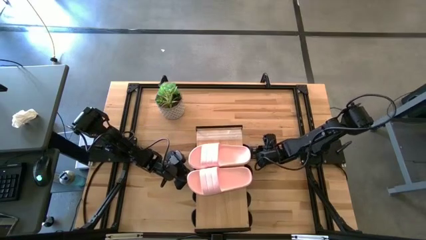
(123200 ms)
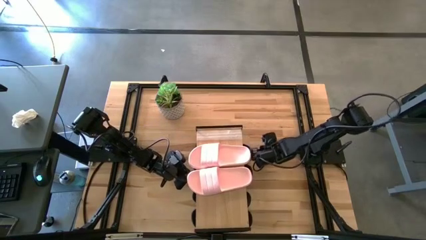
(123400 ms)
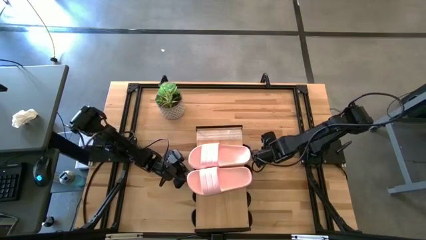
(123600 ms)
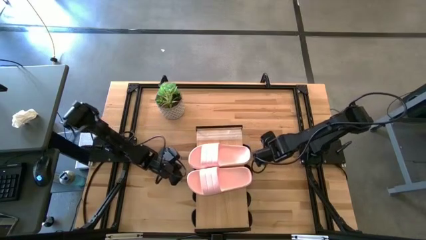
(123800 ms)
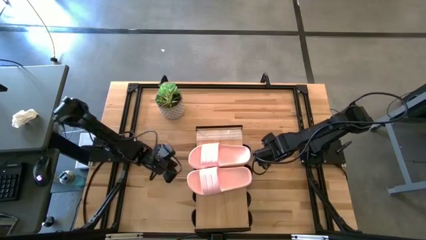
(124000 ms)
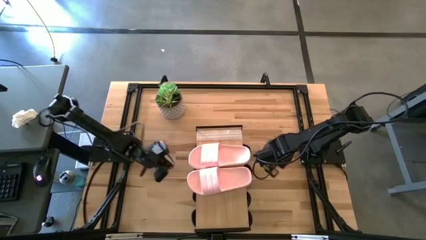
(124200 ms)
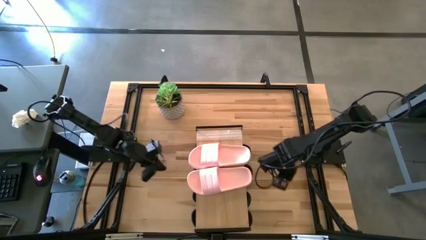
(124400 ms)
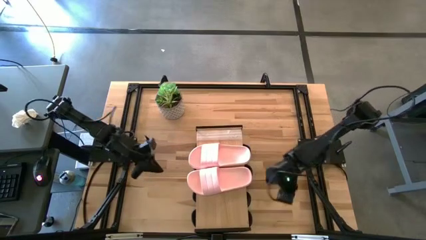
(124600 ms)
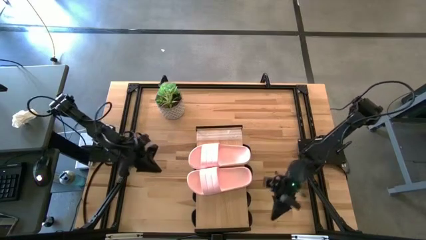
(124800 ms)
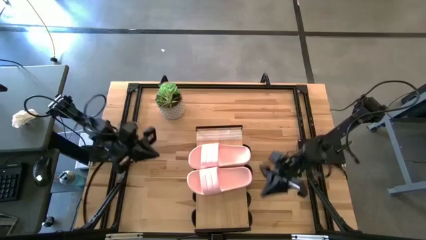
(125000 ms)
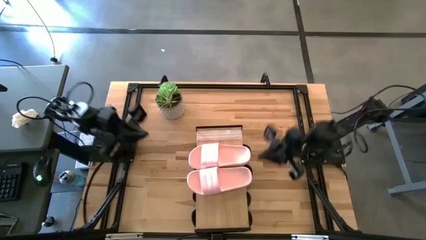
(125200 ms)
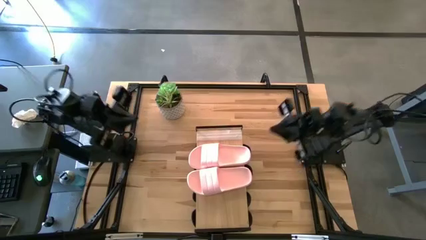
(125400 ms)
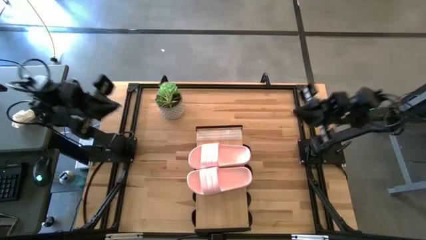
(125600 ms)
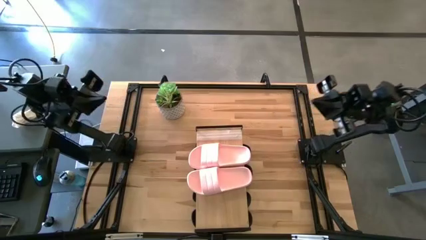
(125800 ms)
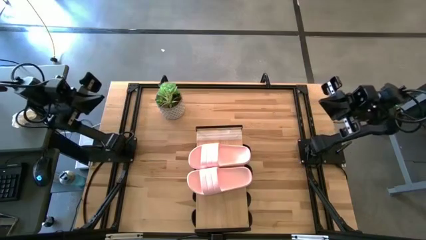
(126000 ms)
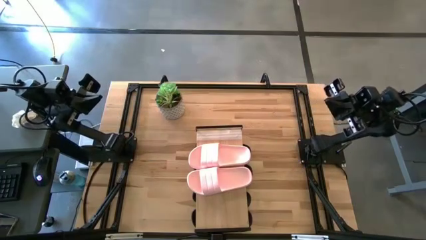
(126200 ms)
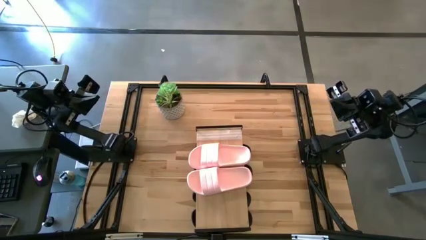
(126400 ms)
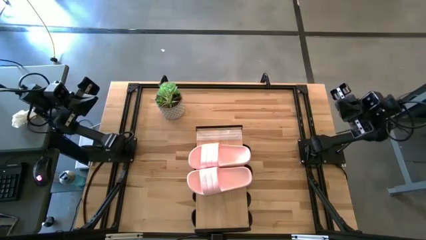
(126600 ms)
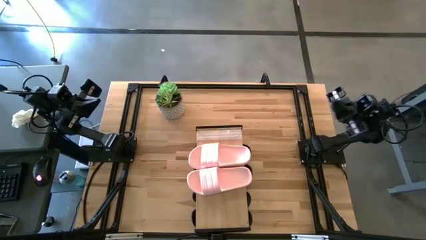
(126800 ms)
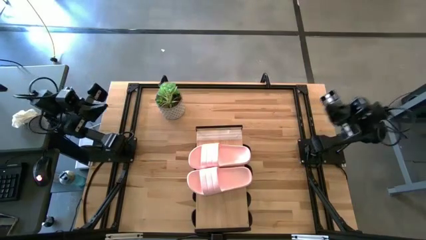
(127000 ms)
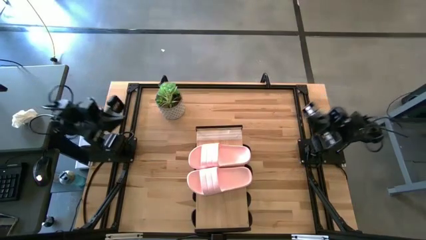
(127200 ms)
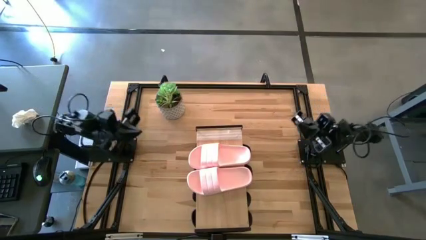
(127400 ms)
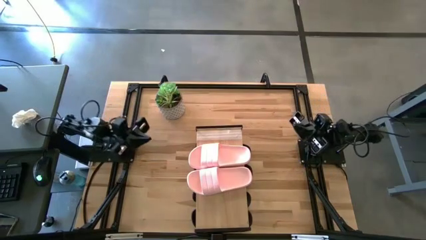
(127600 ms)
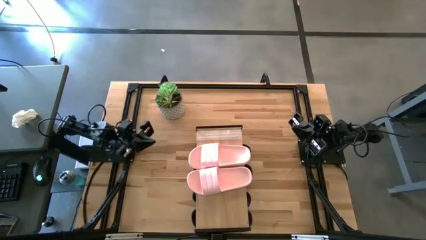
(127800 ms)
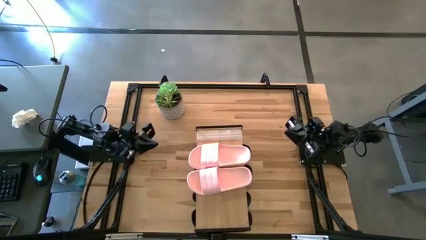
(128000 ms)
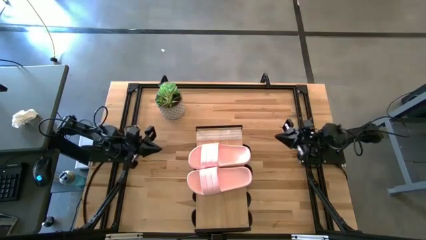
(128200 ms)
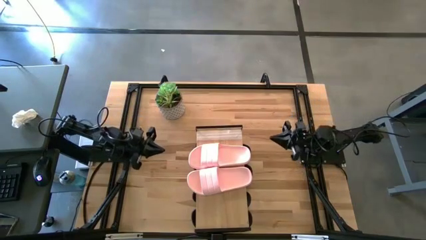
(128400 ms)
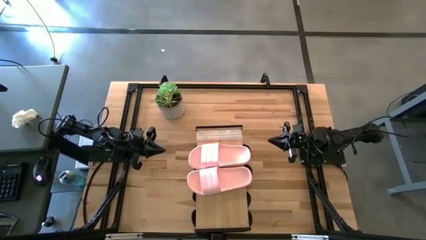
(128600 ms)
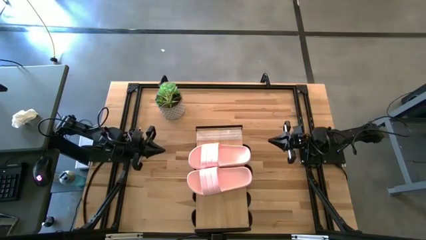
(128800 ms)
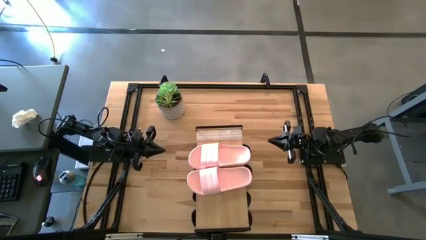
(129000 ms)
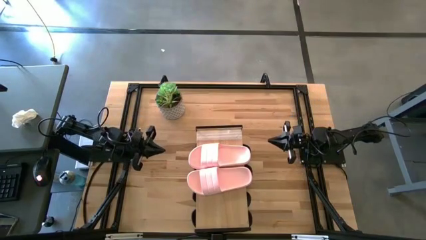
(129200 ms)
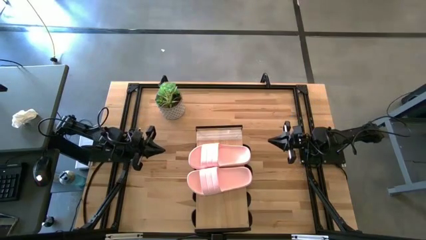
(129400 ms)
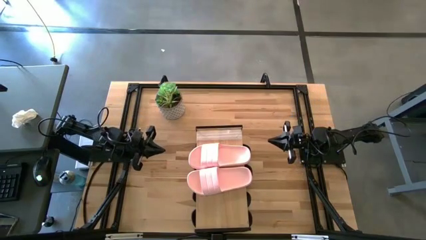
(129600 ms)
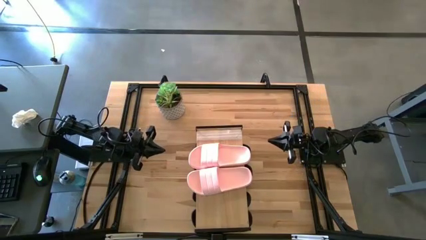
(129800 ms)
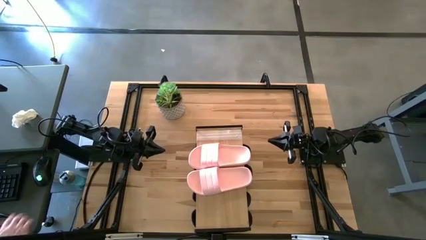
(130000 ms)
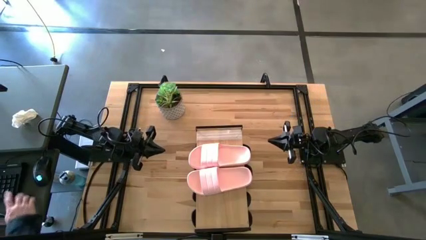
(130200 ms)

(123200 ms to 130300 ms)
Task: Pick and place slides into the shelf
Return to Home Position

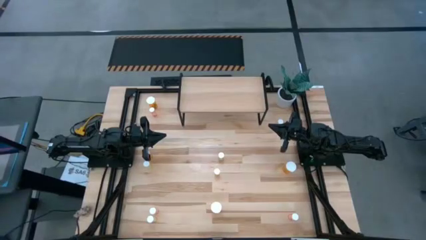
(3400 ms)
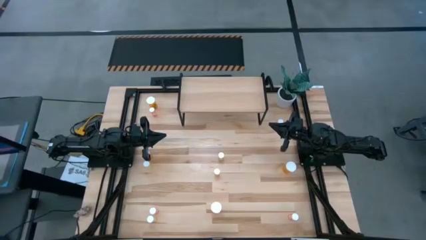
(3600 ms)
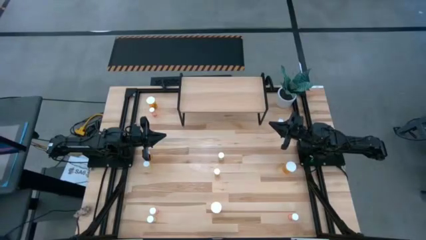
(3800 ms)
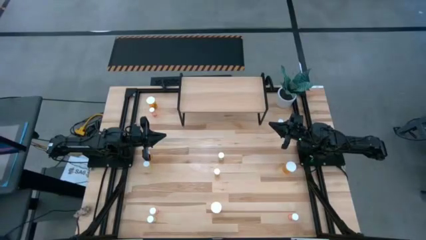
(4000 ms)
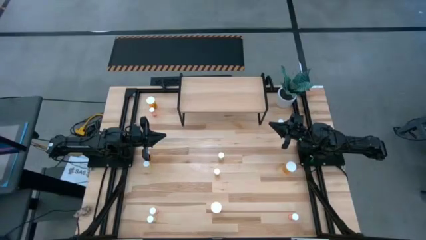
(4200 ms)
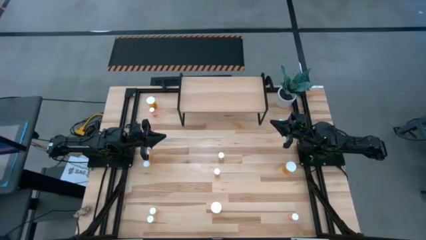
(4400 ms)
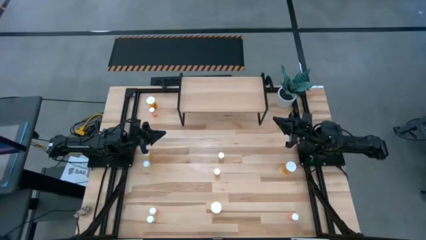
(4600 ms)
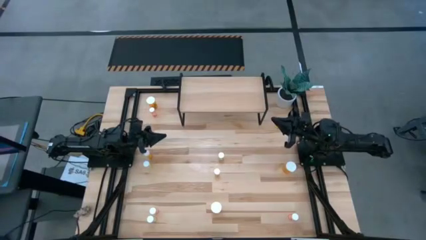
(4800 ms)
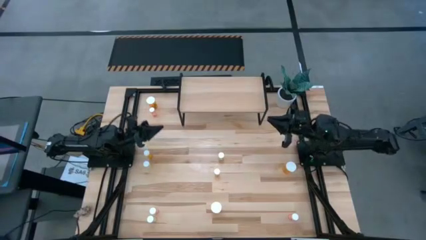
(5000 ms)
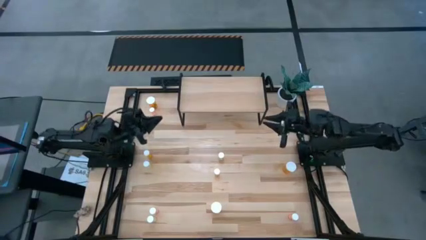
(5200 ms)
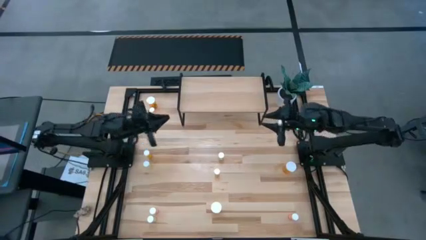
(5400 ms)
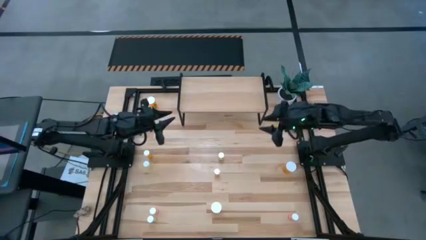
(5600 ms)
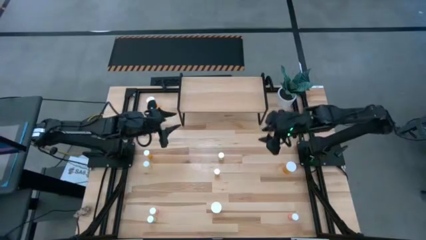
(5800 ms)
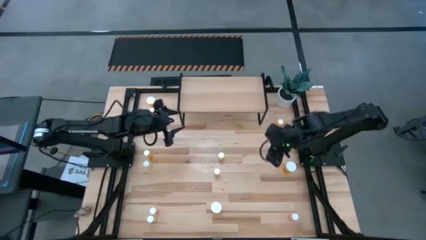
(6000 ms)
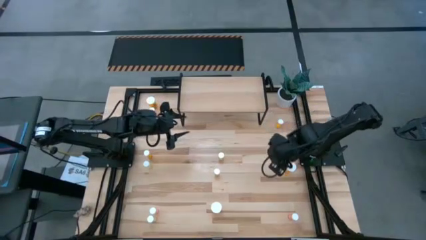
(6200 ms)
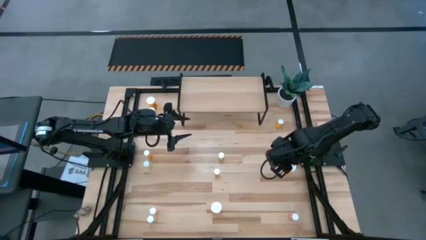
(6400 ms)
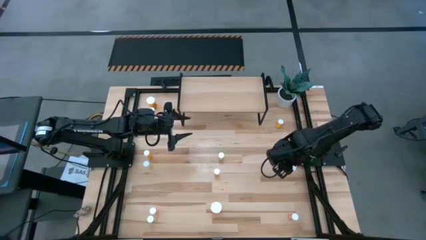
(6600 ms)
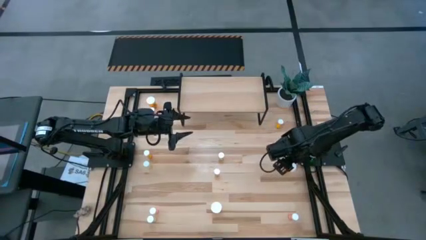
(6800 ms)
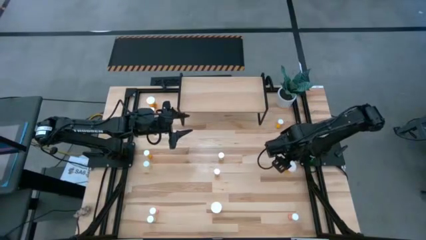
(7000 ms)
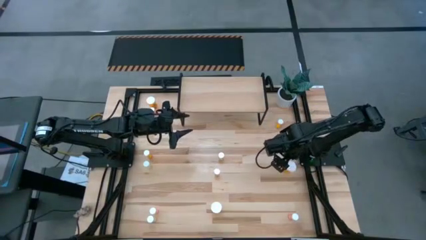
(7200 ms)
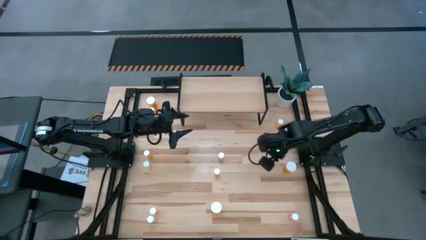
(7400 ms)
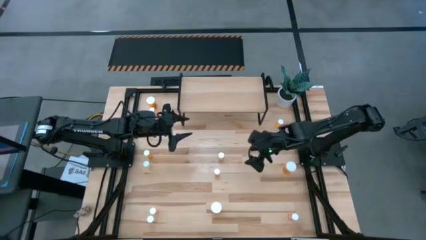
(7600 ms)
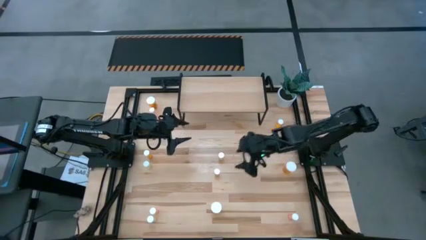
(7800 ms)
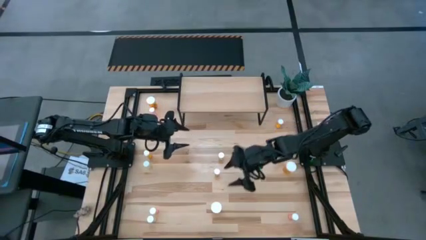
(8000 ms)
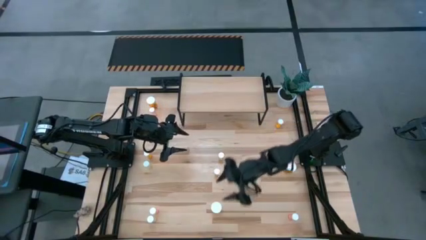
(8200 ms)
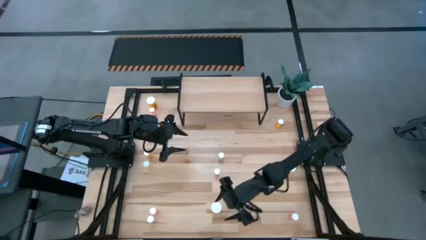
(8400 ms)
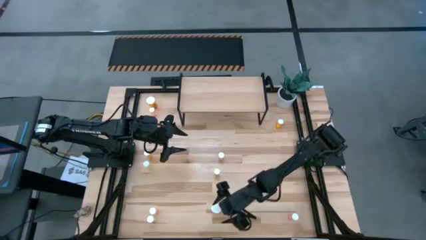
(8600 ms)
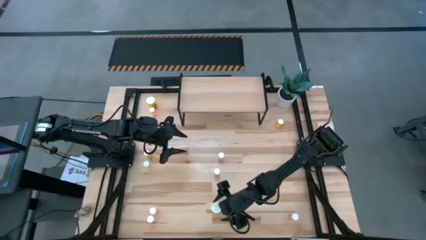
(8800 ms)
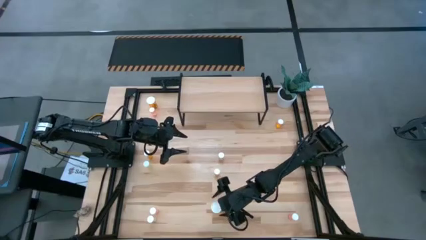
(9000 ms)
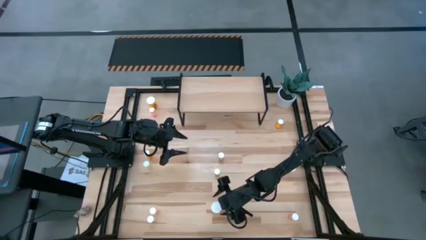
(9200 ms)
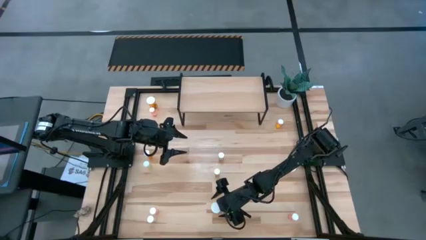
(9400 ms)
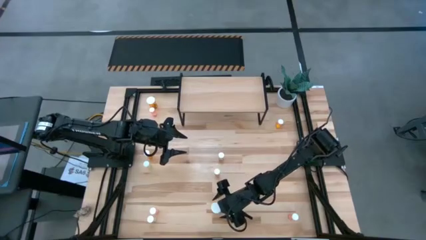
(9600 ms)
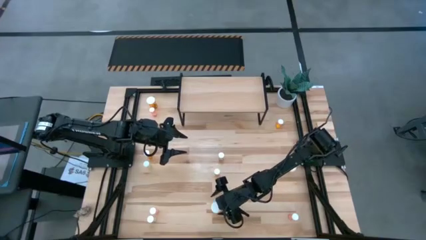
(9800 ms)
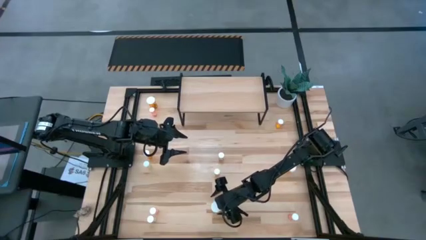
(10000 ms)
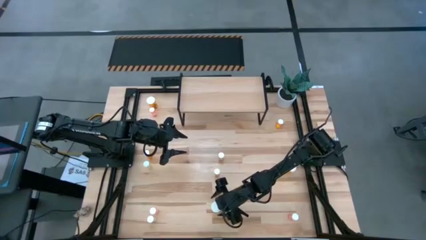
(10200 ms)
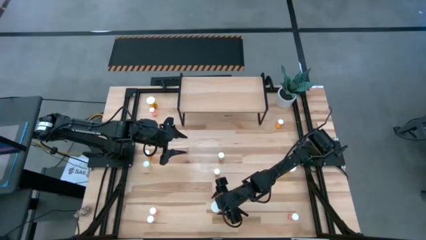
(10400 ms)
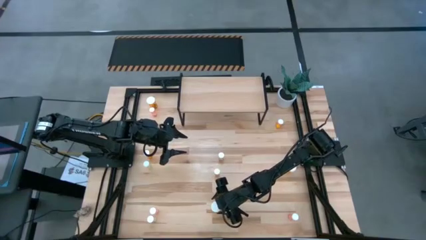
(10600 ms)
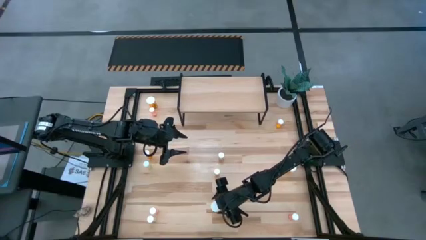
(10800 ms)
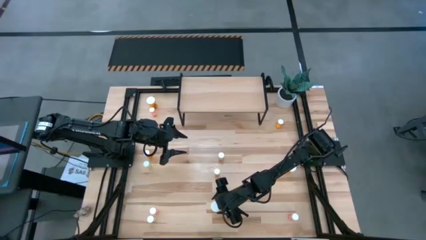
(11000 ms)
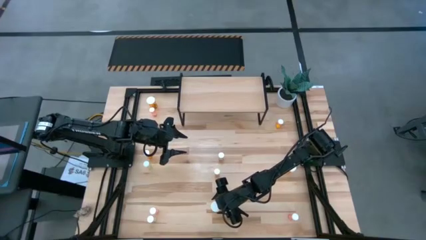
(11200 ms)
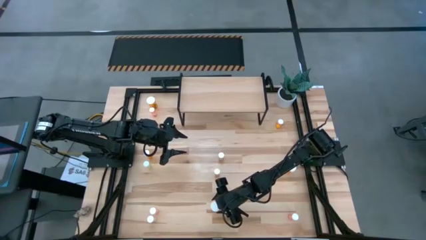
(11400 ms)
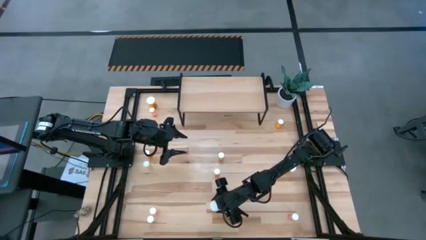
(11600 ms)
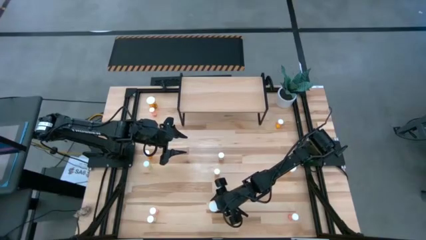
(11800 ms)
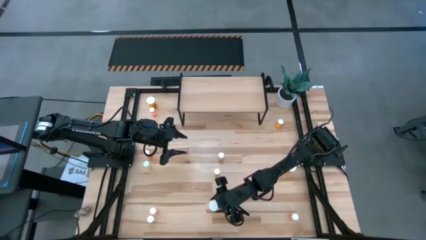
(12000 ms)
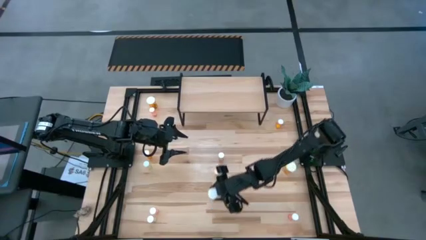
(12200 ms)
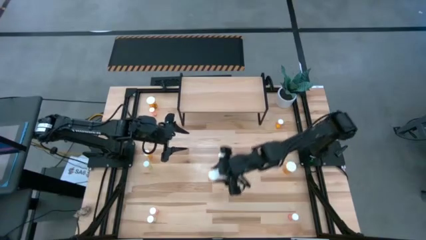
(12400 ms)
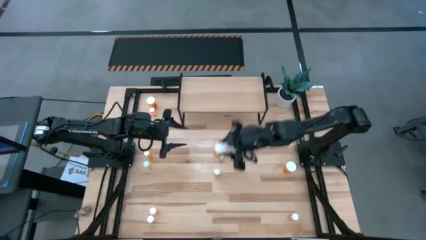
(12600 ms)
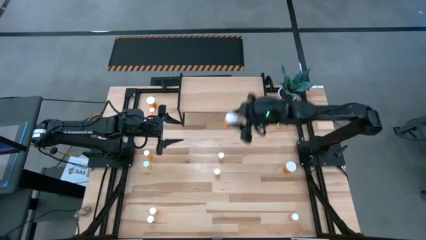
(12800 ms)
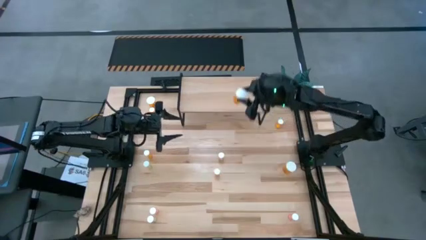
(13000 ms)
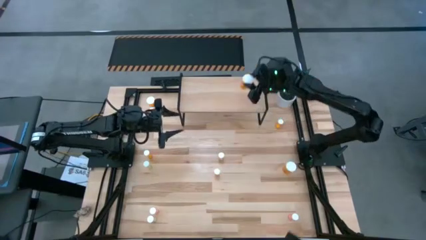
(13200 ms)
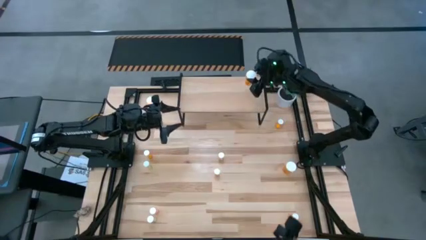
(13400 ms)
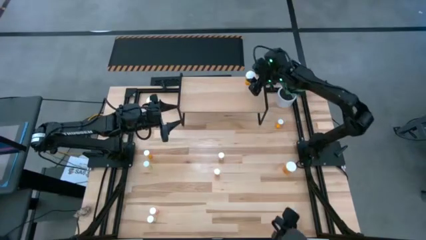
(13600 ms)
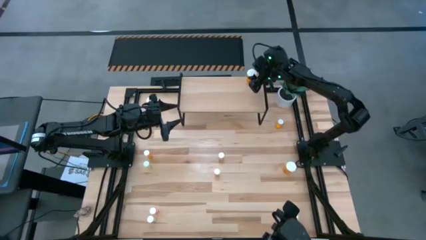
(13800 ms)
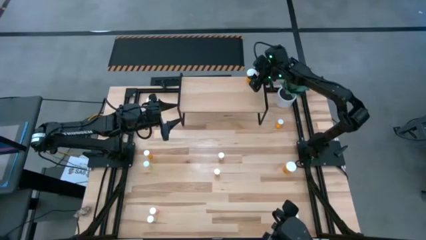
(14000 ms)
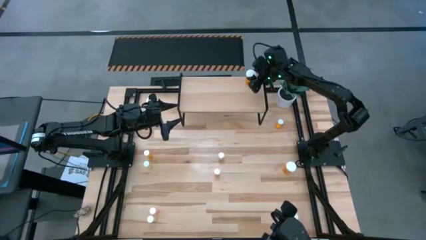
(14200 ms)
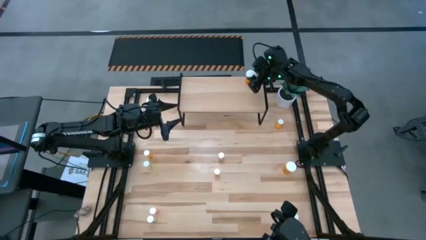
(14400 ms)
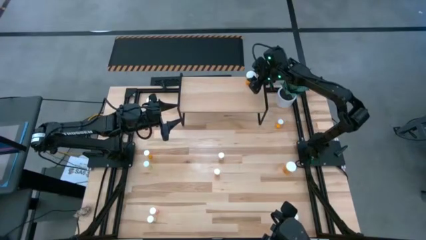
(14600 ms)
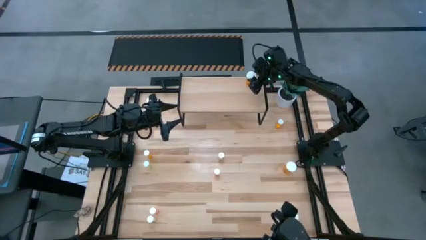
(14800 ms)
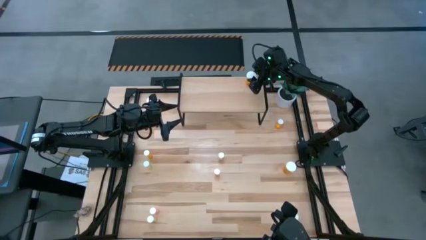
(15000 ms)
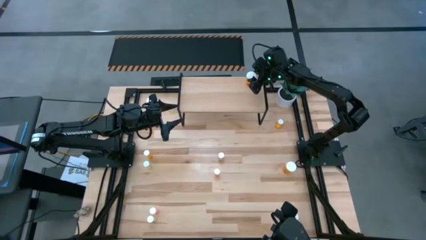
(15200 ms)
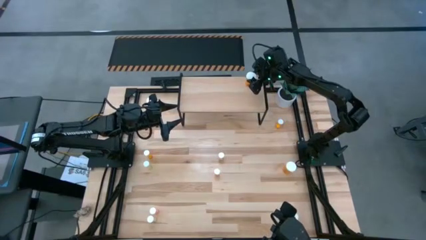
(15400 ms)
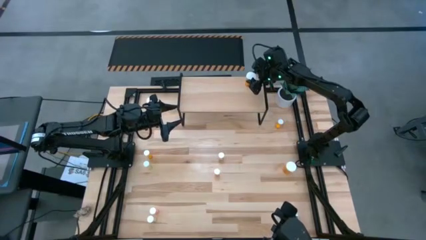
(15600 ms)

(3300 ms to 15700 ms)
Task: Pick and place medicine bottles onto shelf by color
Put the bottom large orange pill bottle in the top right corner of the shelf
